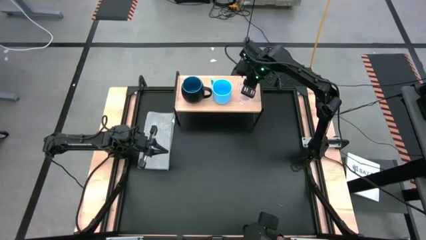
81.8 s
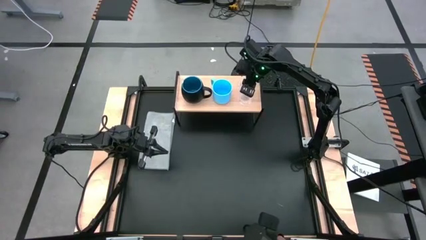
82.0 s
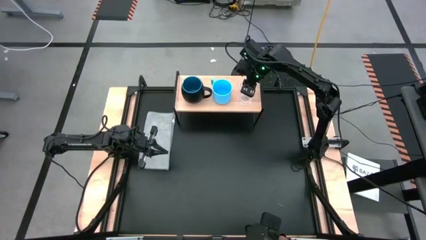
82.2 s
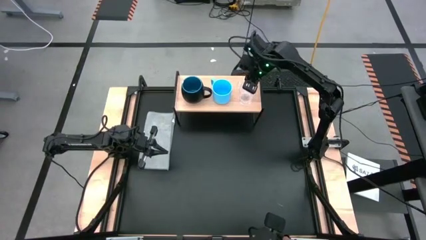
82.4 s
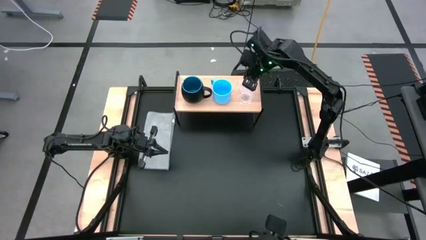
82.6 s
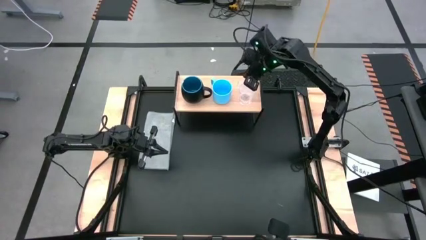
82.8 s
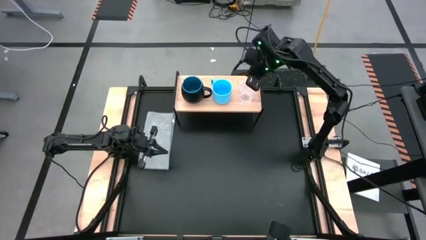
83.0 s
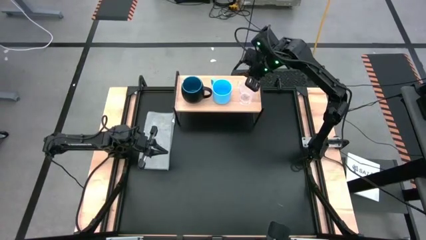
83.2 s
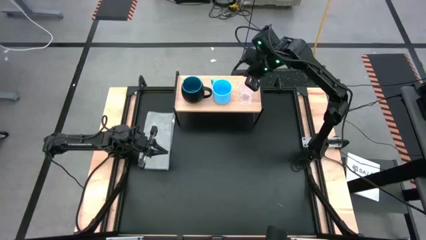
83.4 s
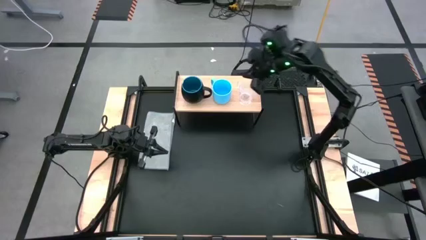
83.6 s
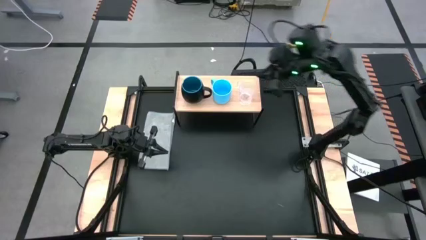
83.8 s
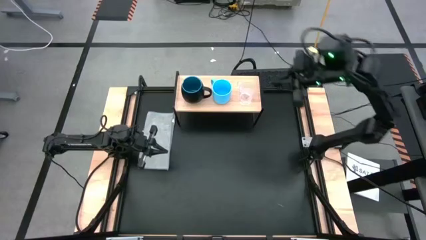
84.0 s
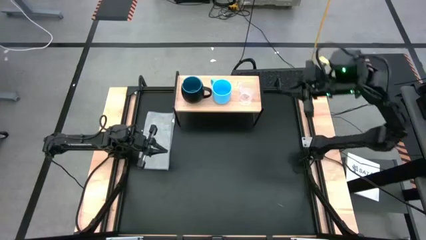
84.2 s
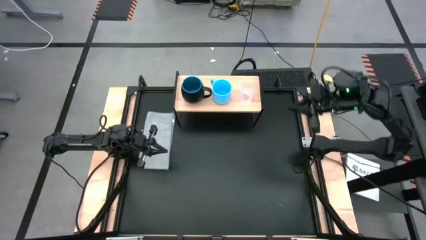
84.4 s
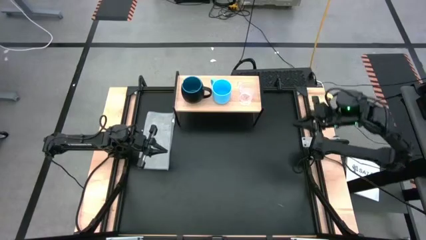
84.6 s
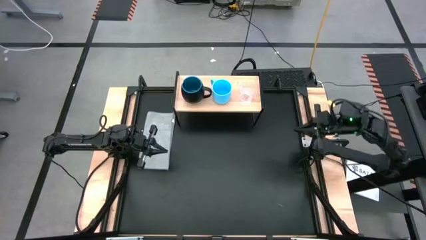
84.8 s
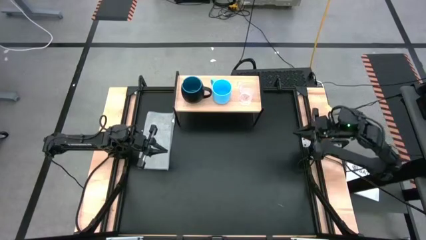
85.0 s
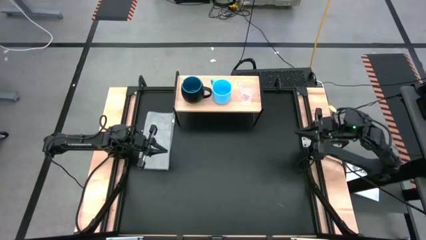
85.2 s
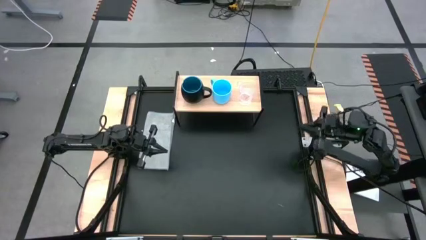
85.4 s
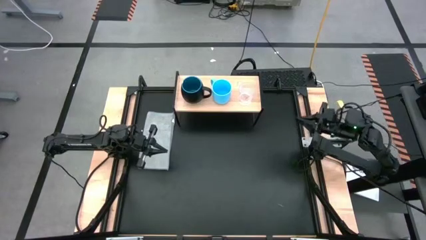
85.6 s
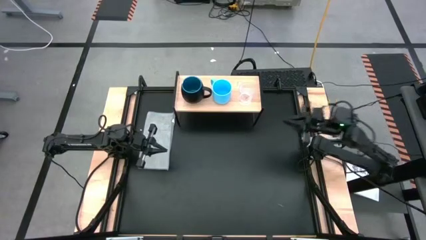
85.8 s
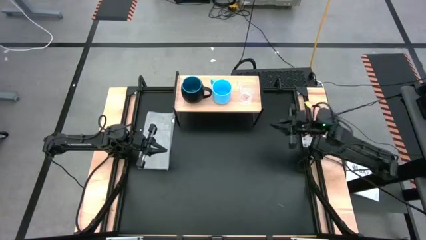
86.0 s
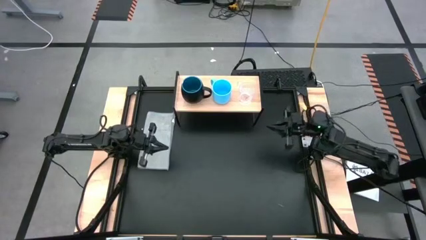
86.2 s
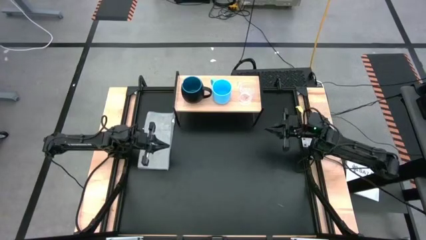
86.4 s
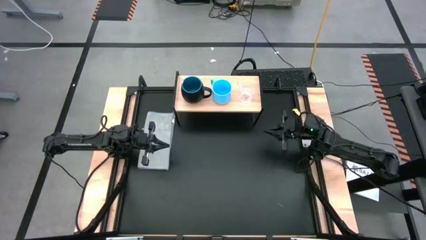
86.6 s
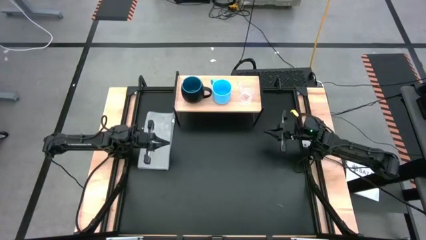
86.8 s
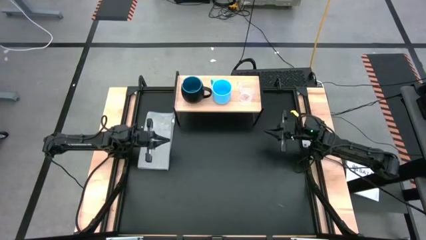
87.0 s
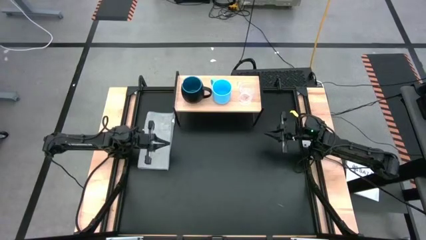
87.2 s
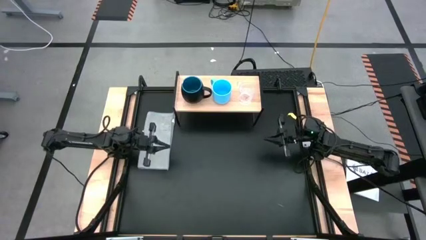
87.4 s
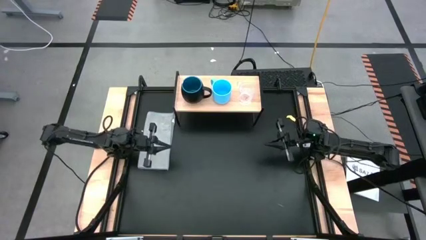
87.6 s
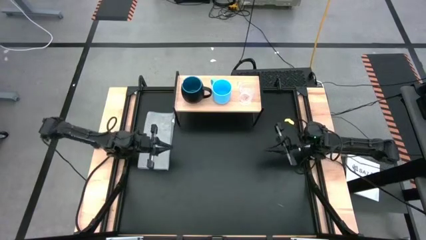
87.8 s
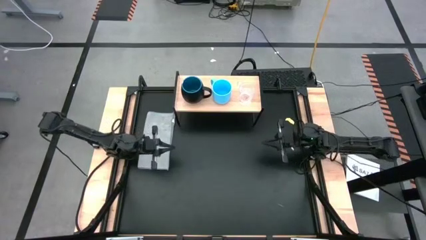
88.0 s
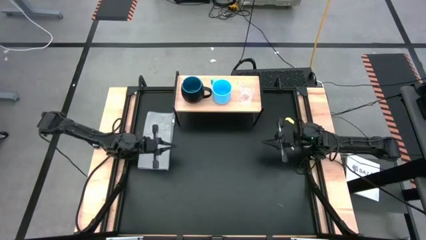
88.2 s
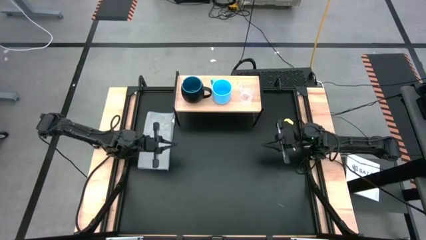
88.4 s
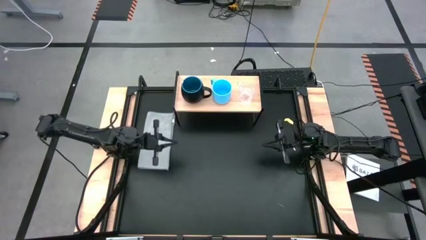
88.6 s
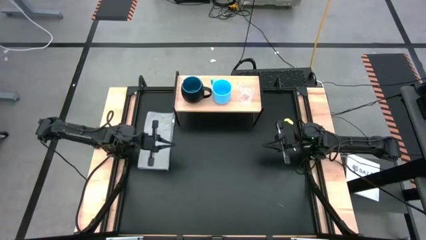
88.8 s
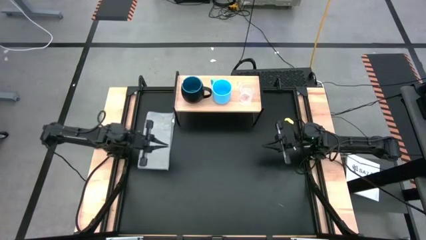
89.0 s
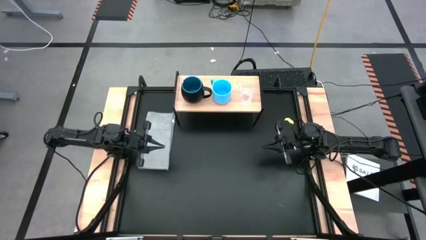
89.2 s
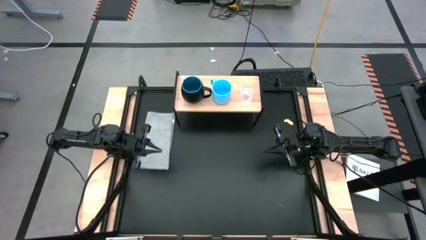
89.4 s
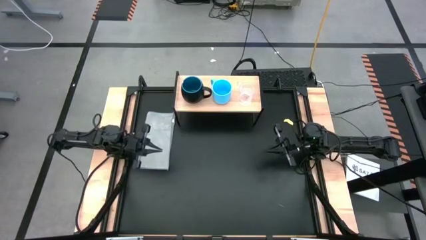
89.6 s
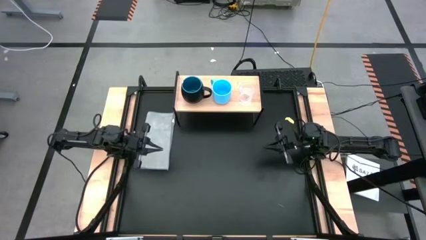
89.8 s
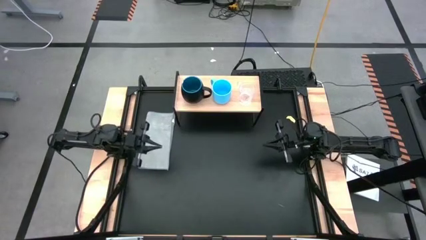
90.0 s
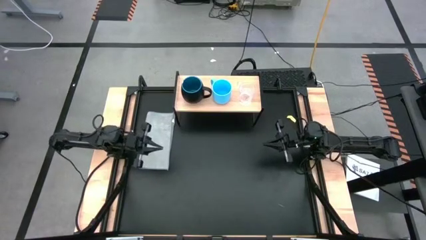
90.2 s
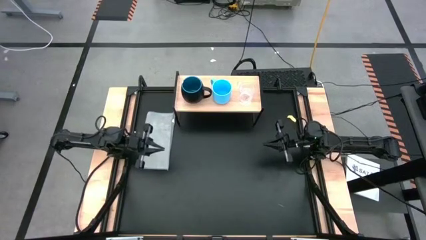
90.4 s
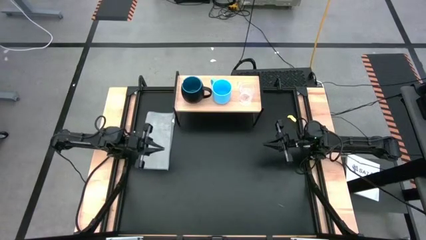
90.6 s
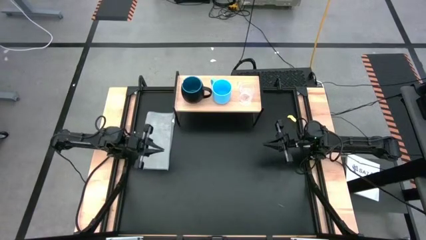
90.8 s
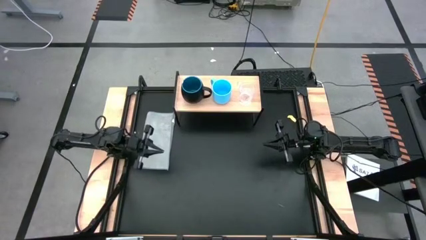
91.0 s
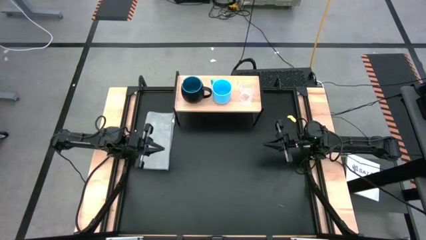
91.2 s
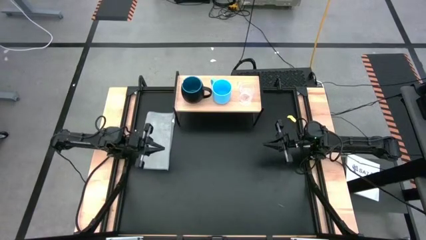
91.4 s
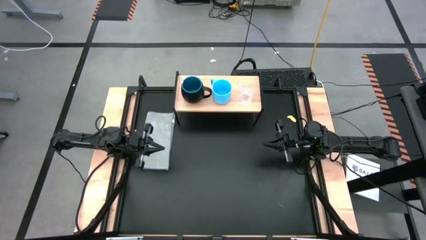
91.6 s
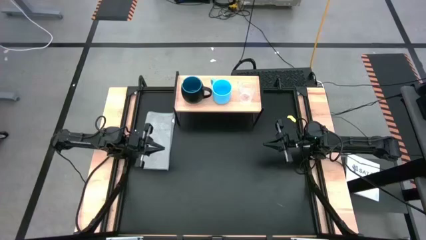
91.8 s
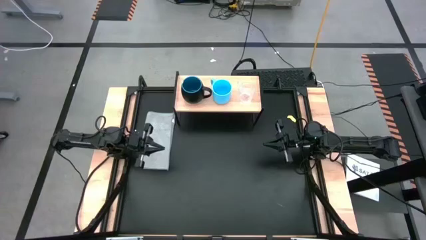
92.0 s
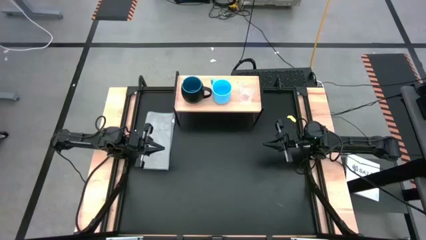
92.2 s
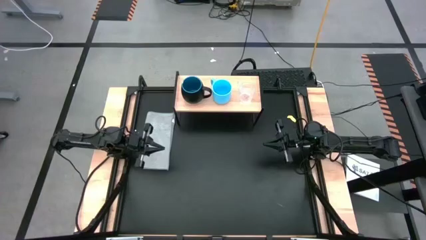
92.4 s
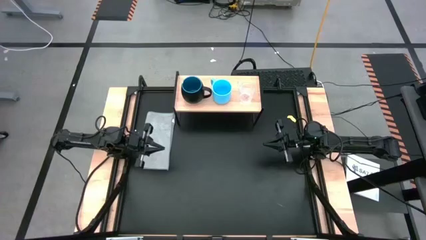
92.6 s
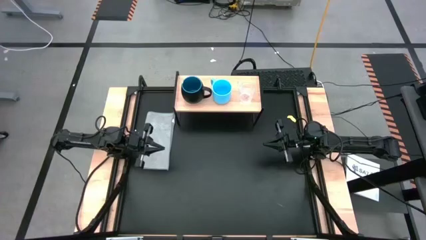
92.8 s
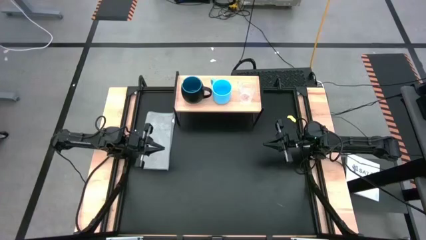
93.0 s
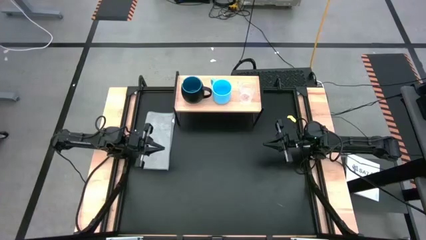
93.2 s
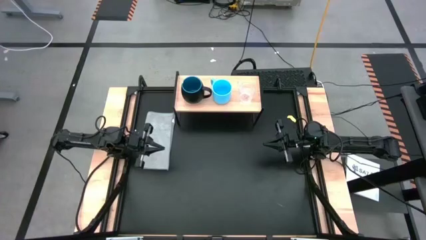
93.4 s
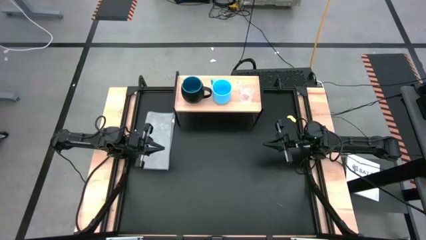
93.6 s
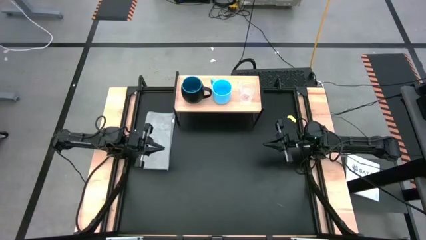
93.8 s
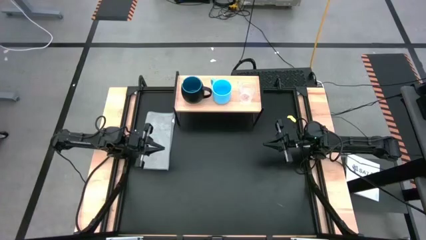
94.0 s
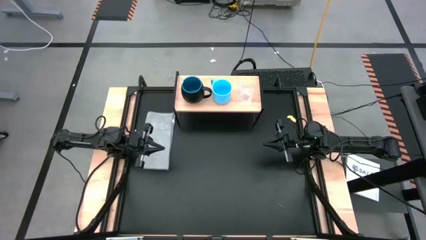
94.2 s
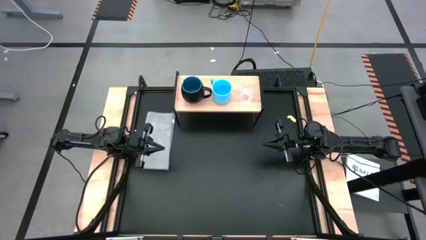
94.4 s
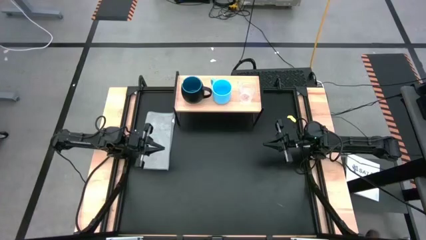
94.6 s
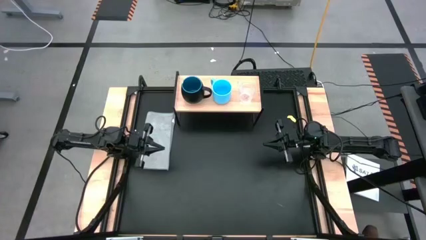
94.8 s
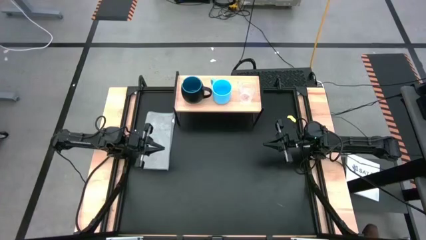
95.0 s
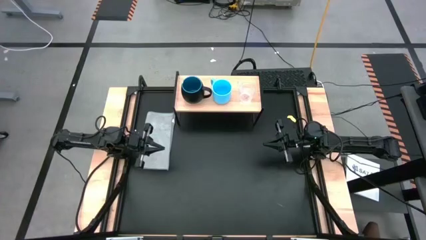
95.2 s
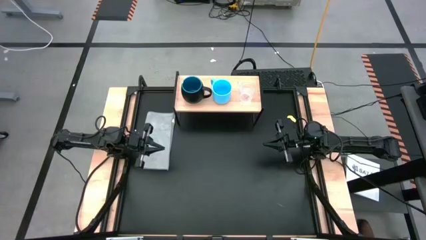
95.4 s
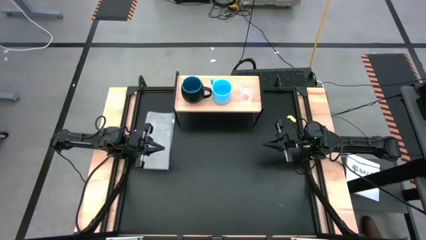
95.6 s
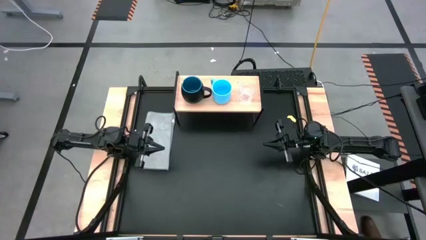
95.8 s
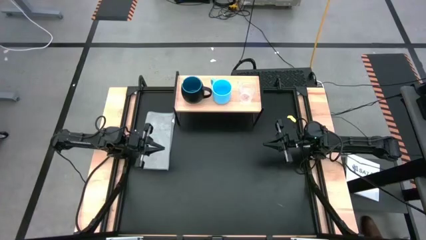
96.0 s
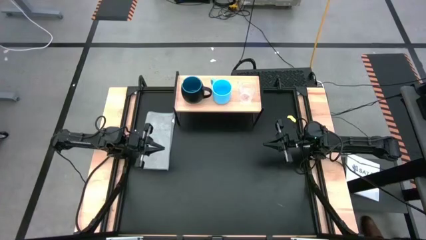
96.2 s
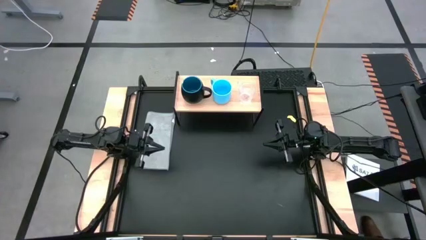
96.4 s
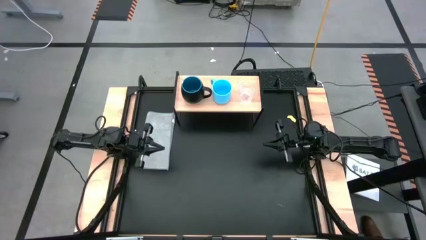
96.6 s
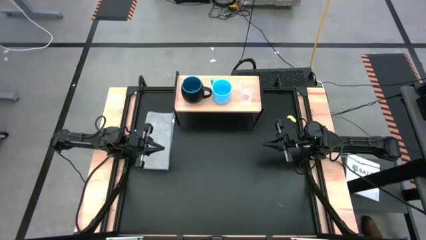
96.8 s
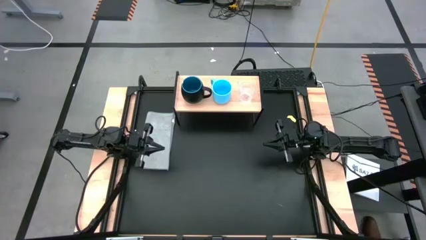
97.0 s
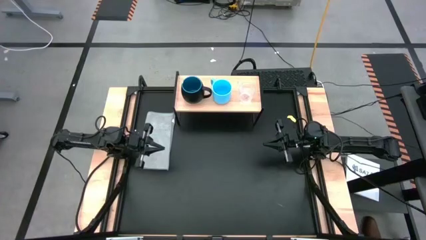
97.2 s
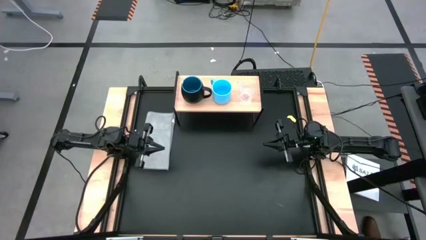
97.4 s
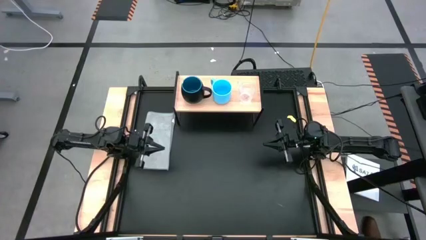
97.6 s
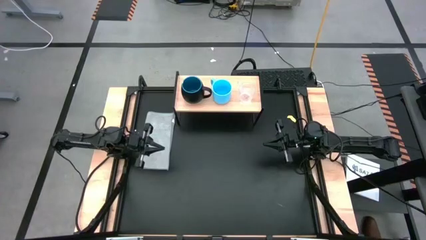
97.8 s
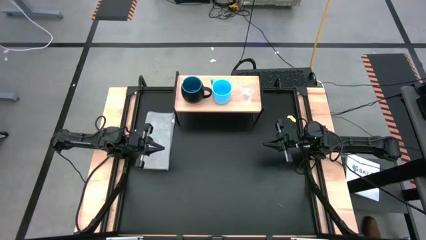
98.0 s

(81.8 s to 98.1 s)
Task: Stack small to large cups/mugs on shelf
Return to Home Position
